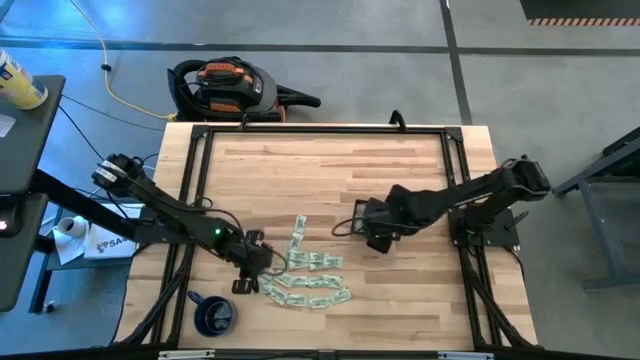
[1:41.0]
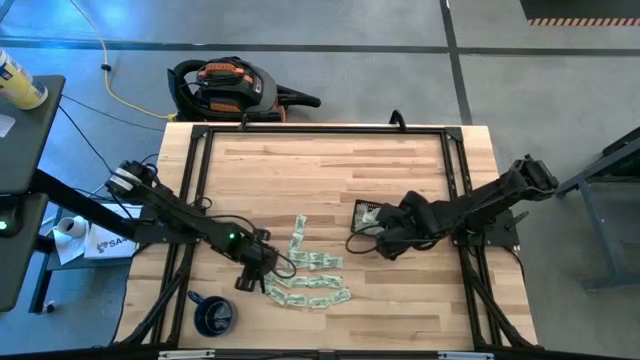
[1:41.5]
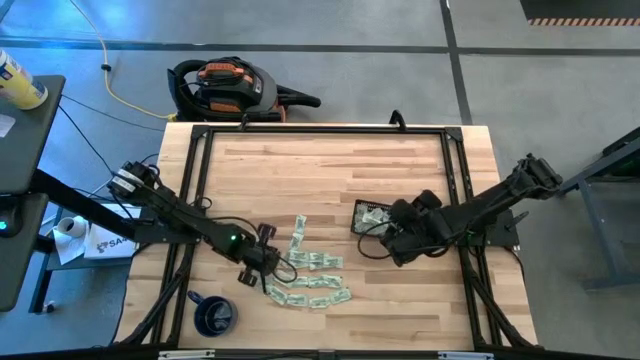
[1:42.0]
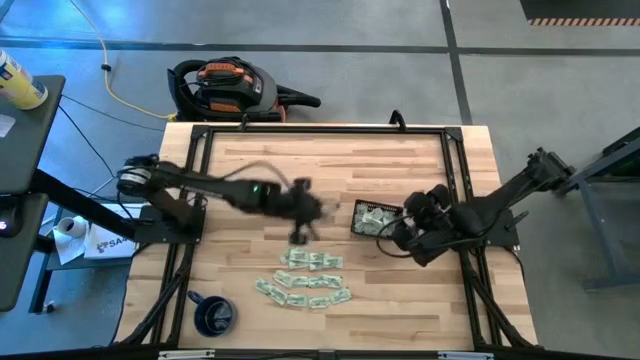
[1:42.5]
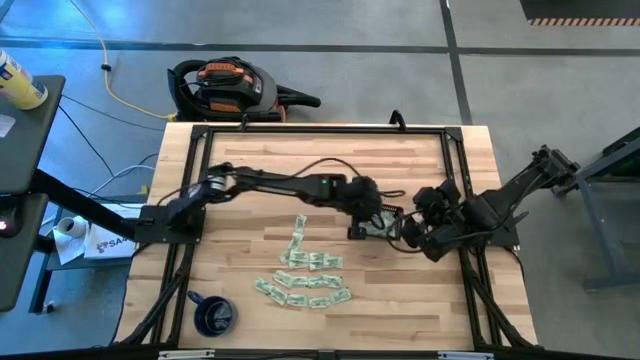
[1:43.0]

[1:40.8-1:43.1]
Task: Pick and place Stevia / Truvia into bins
Put the stevia packet into the black bin

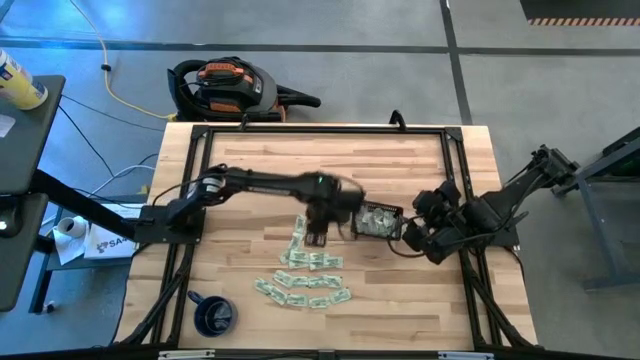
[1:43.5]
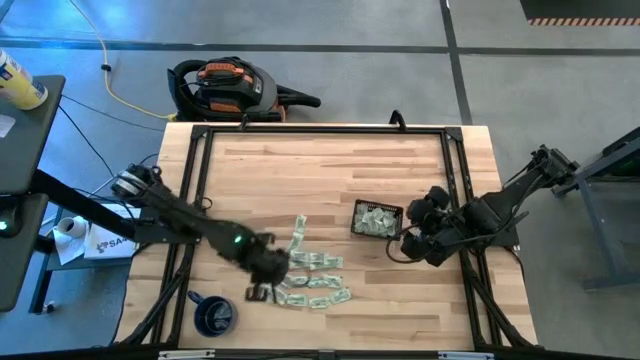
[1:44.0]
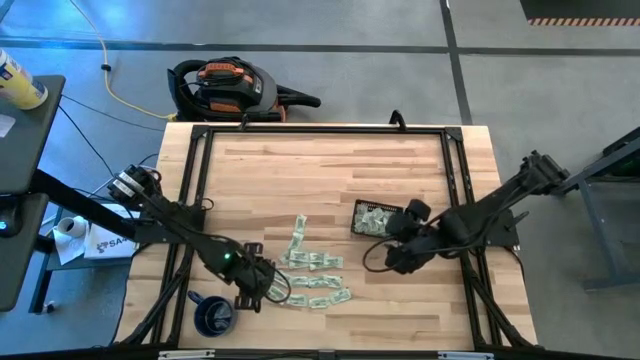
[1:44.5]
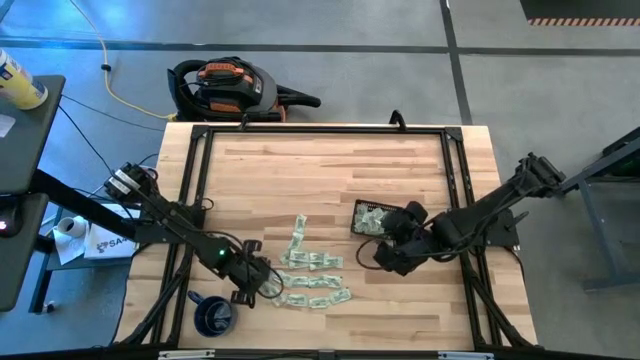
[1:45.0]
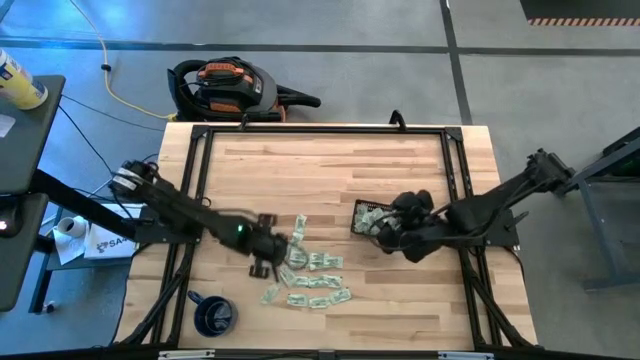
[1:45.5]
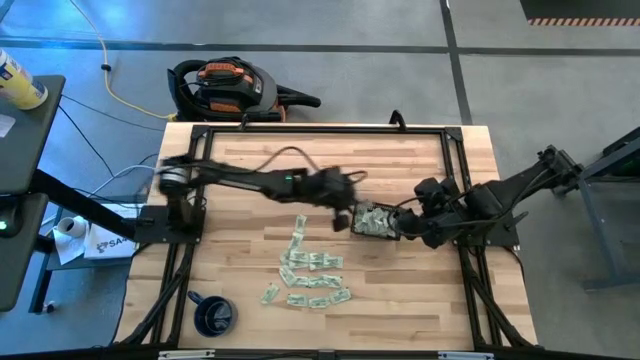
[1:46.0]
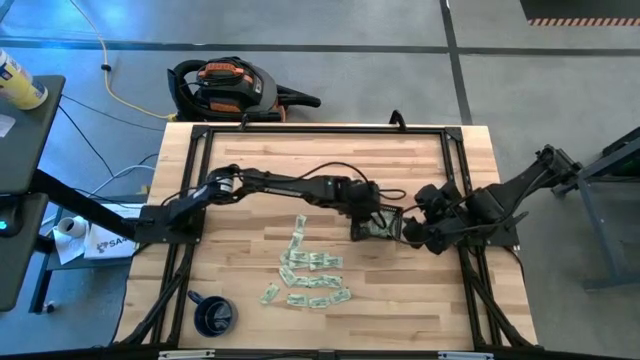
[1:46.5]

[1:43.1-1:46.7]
Put the stevia packet into the black bin

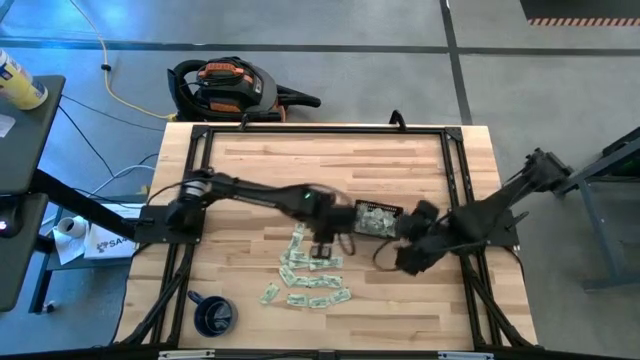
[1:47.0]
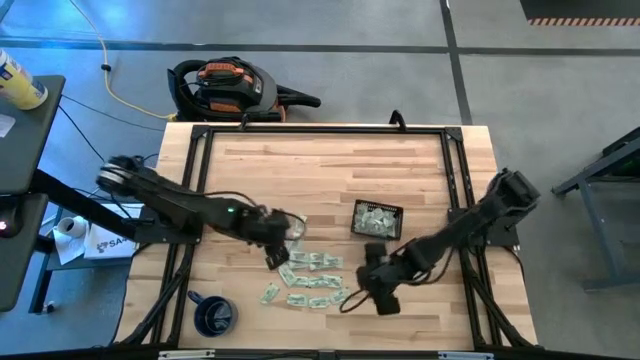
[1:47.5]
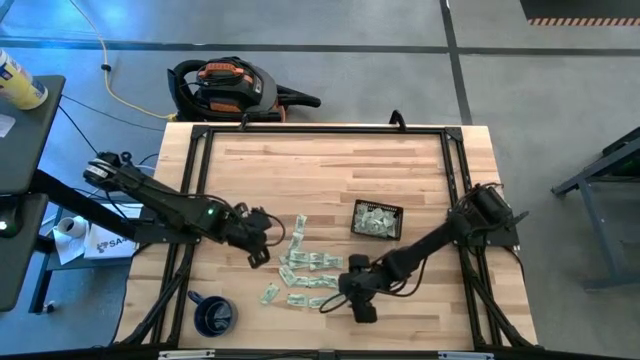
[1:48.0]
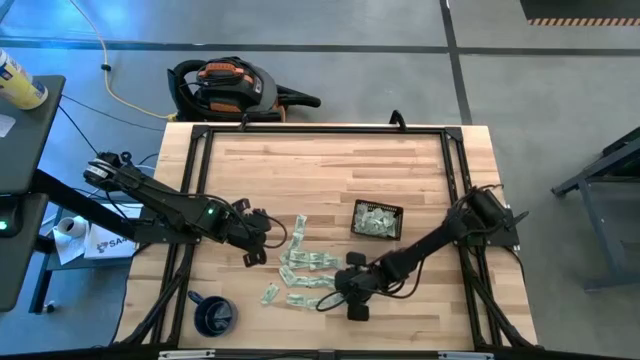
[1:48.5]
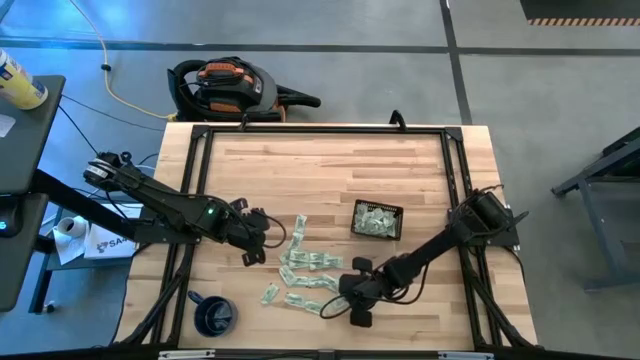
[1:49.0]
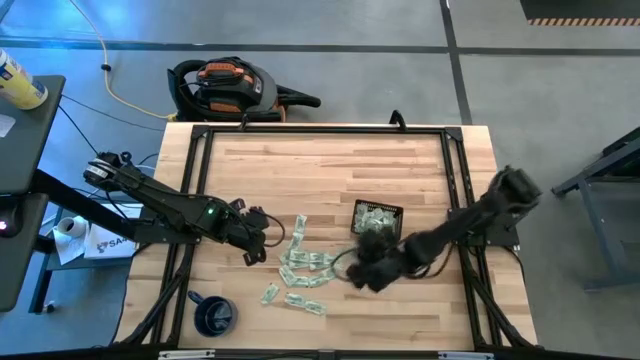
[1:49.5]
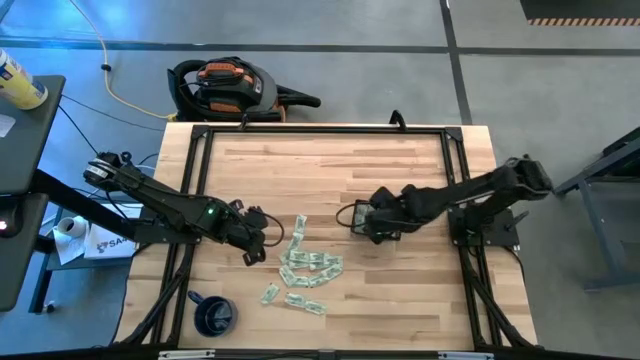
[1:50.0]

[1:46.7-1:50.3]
Put the stevia packet into the black bin

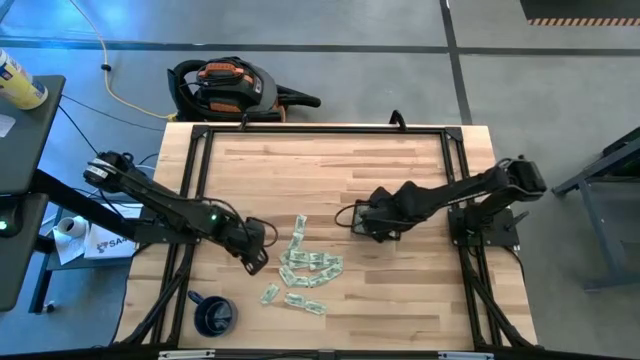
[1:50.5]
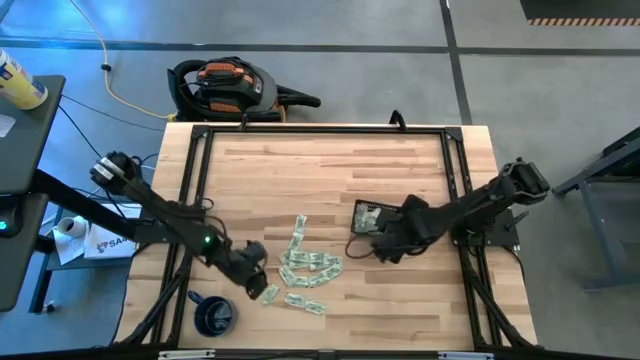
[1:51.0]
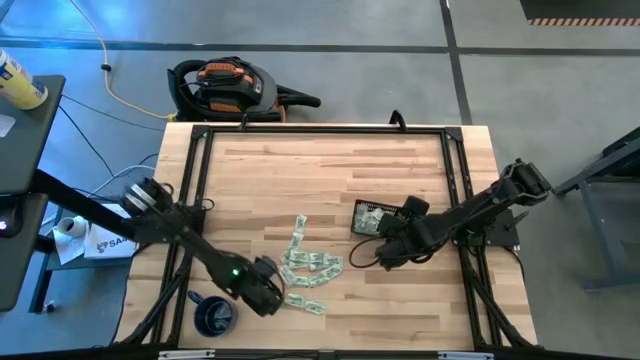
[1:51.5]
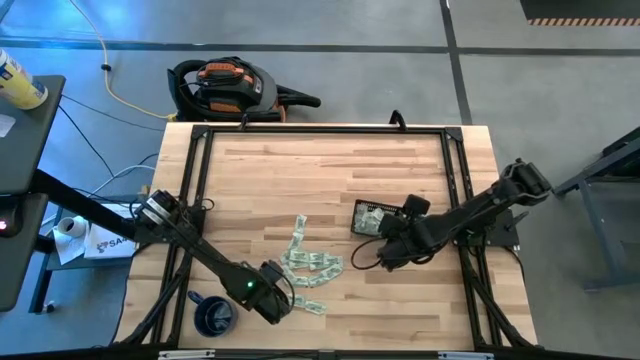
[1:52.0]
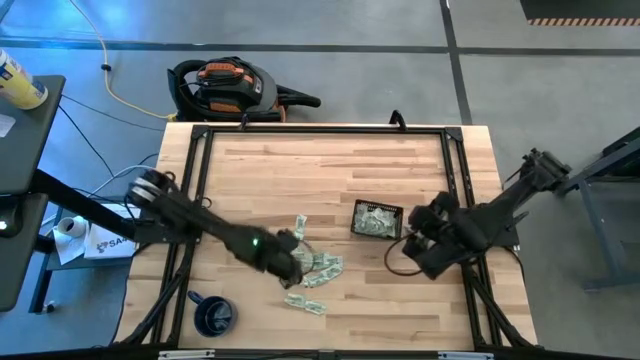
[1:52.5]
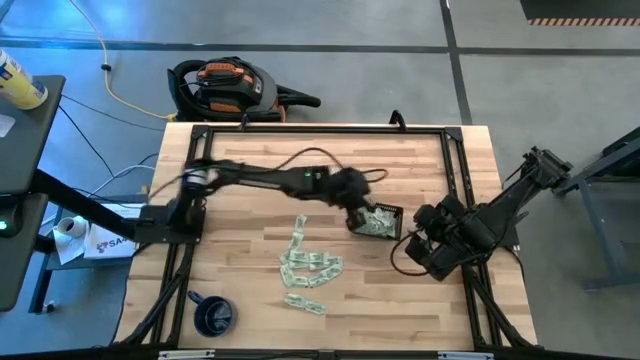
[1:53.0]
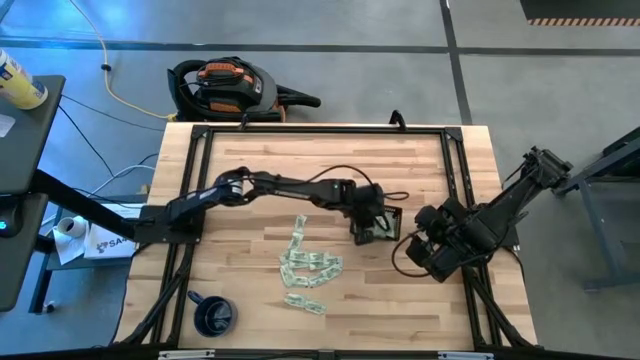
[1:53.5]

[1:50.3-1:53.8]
Put the stevia packet into the black bin

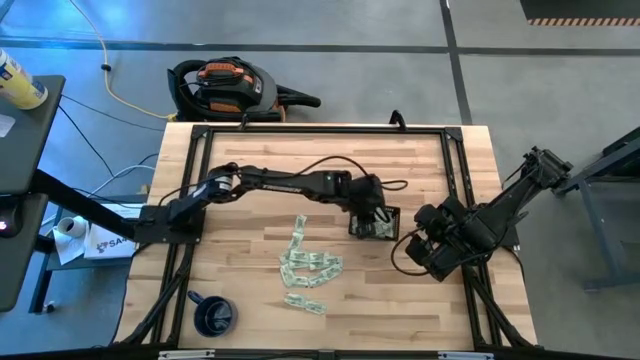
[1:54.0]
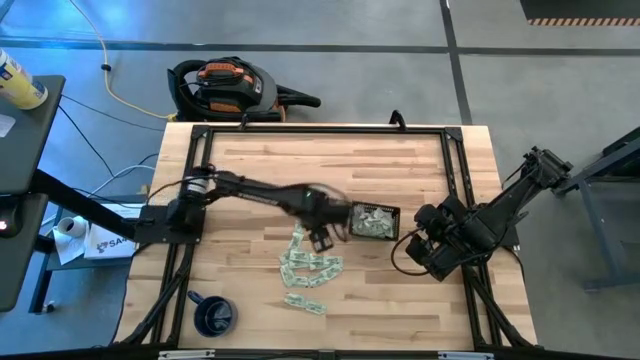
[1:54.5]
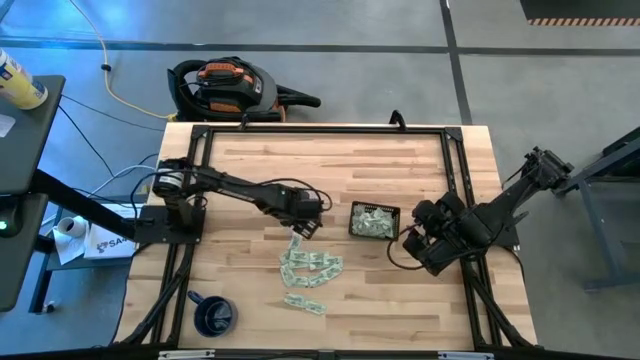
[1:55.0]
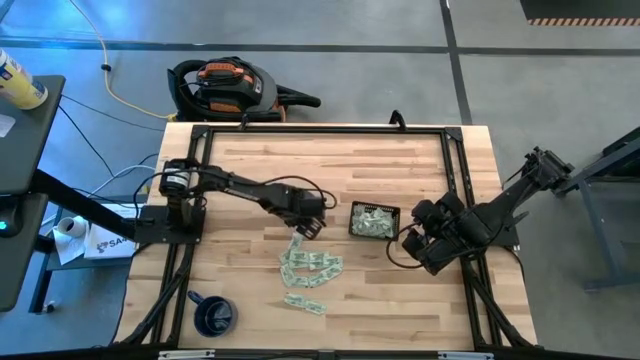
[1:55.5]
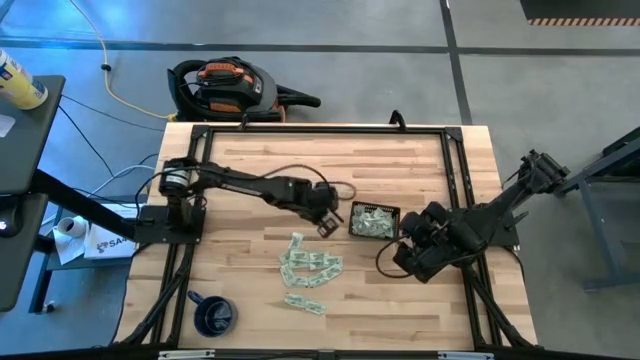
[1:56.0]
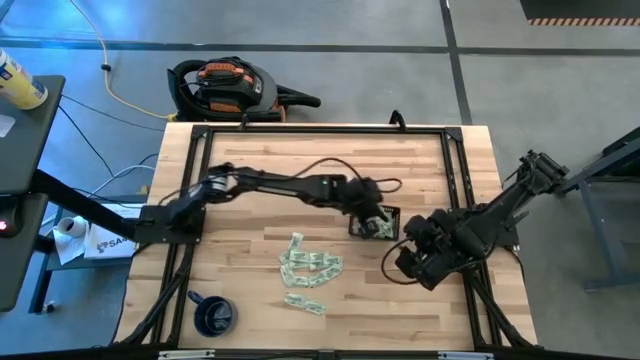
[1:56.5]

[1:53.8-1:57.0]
Put the stevia packet into the black bin

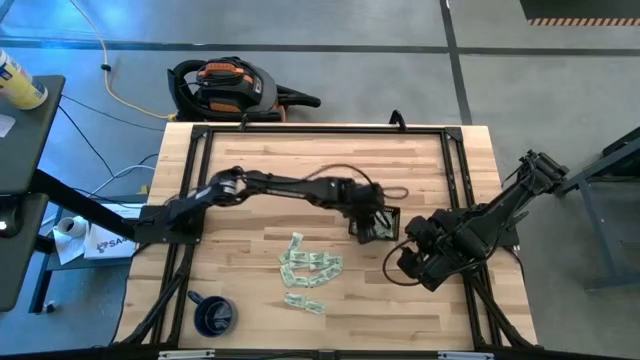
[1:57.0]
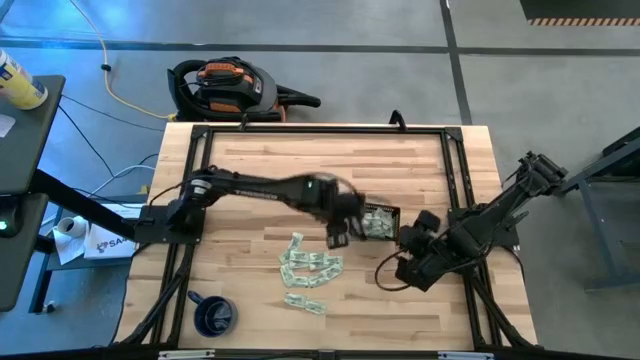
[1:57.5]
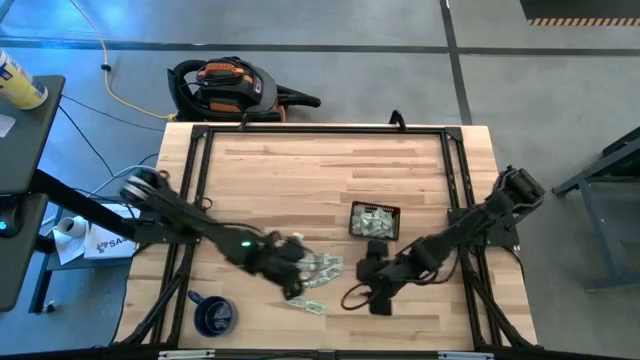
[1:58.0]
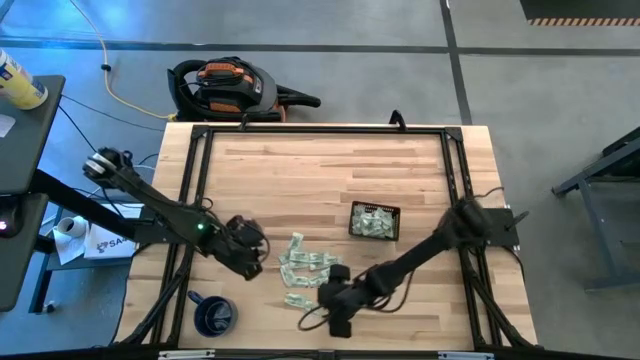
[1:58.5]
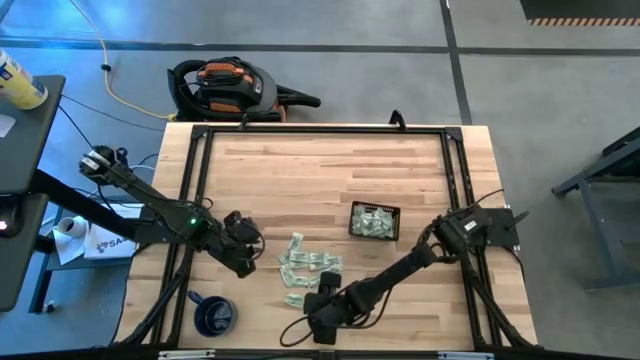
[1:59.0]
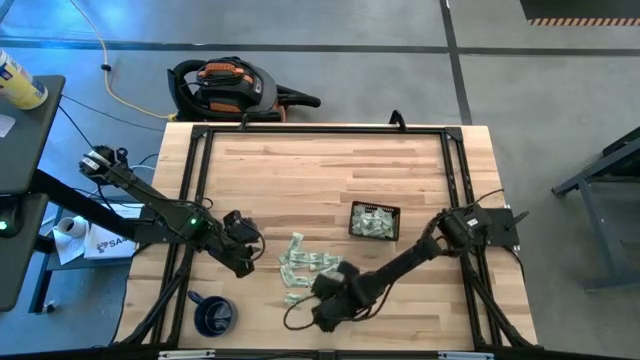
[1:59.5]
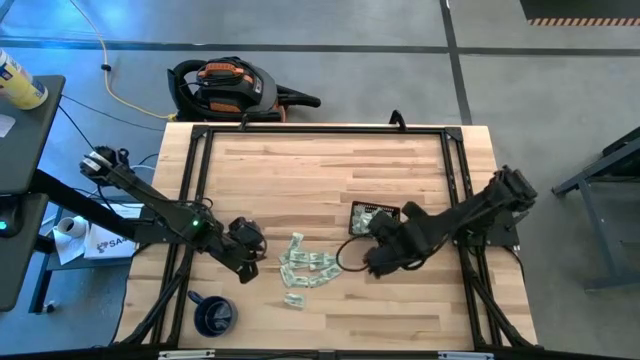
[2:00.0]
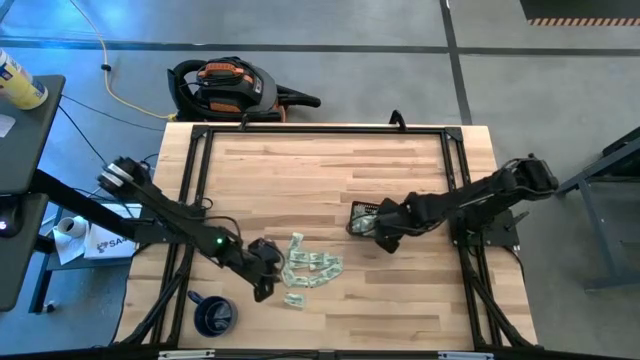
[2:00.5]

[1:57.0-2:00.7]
Put the stevia packet into the black bin

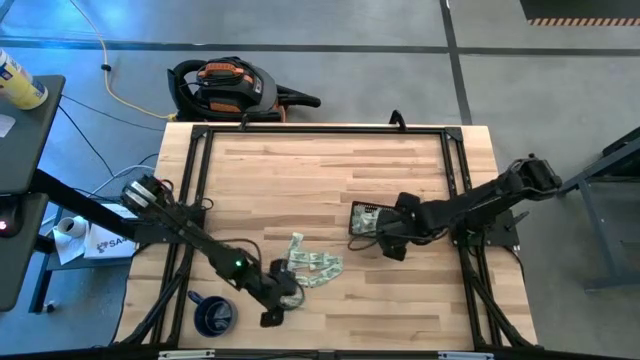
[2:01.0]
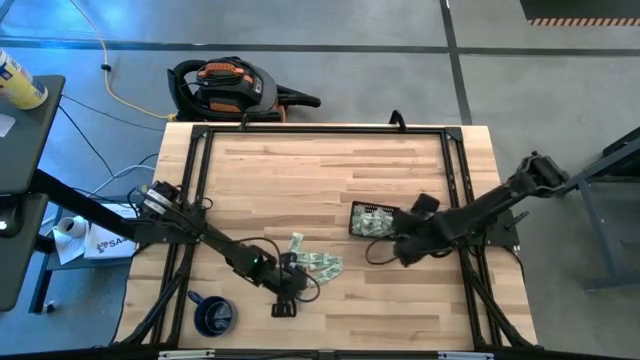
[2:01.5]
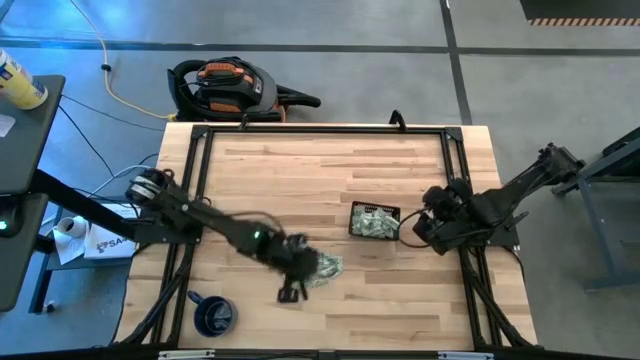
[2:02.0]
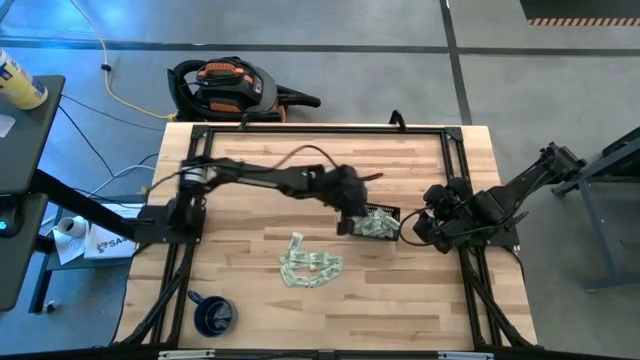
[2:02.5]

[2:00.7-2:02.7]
Put the stevia packet into the black bin
